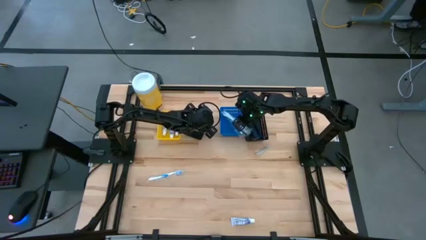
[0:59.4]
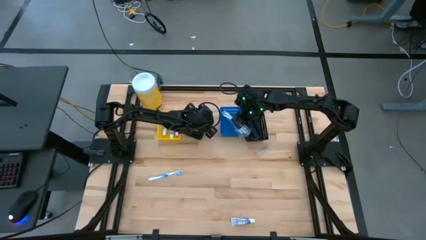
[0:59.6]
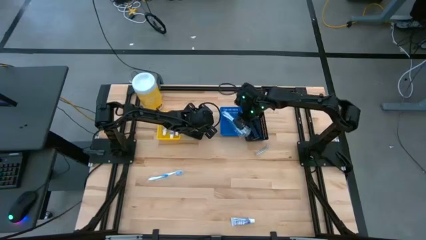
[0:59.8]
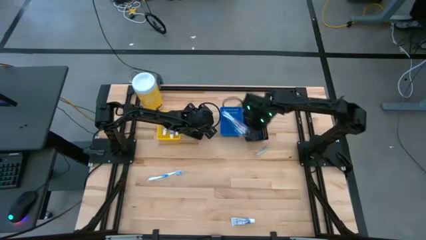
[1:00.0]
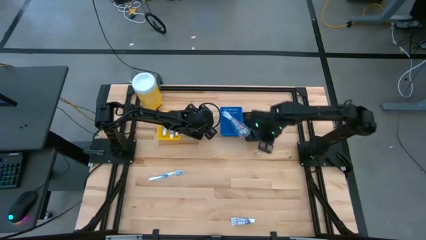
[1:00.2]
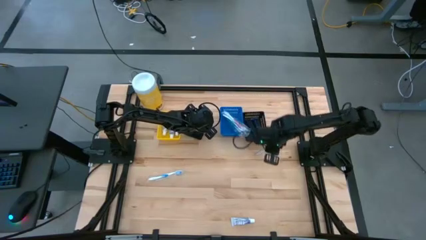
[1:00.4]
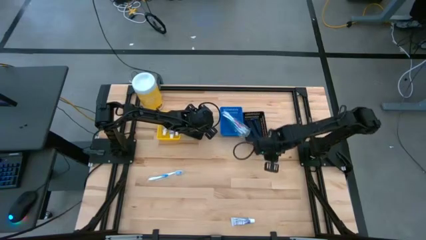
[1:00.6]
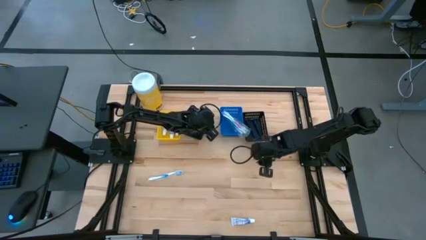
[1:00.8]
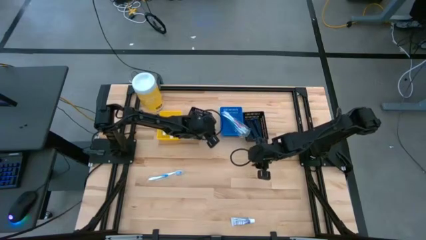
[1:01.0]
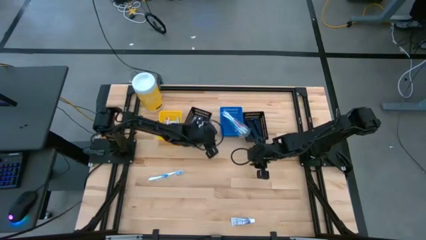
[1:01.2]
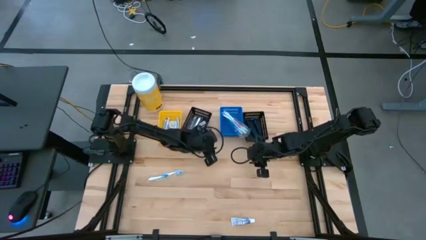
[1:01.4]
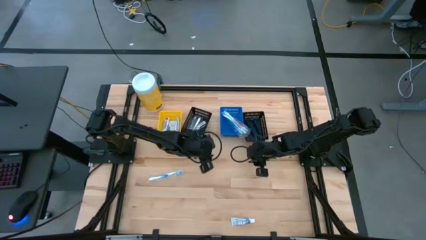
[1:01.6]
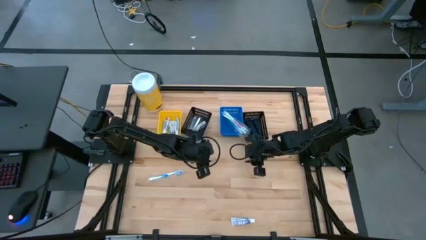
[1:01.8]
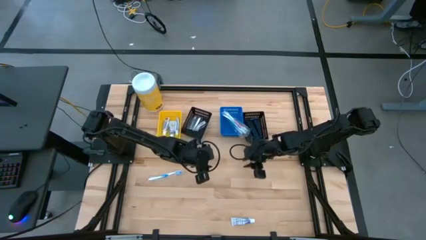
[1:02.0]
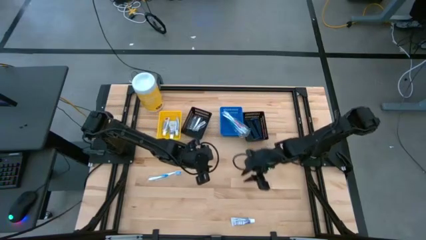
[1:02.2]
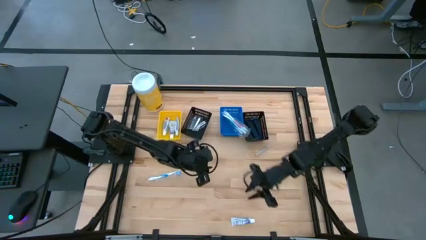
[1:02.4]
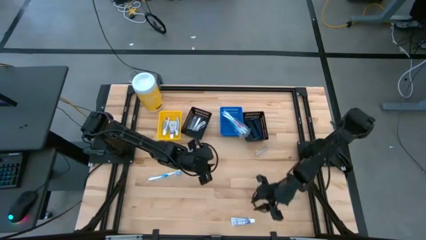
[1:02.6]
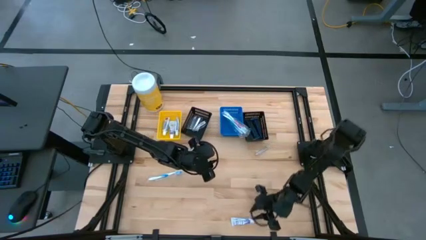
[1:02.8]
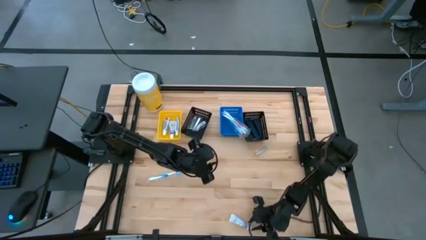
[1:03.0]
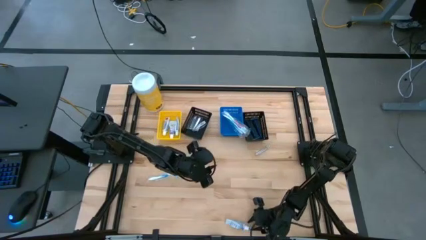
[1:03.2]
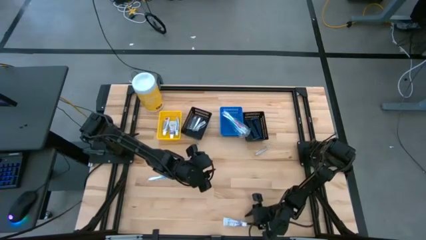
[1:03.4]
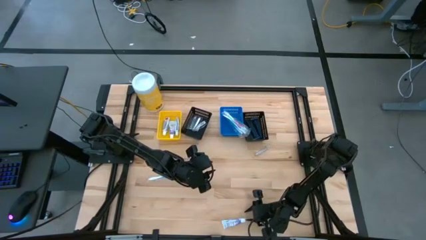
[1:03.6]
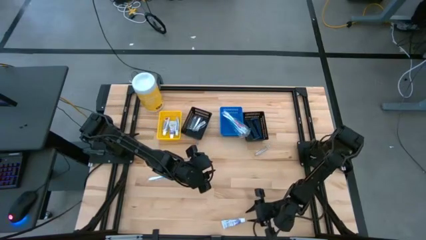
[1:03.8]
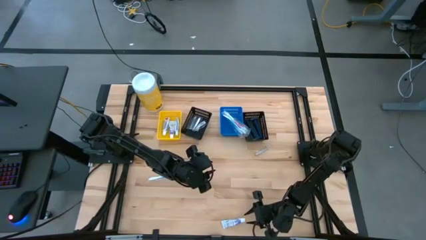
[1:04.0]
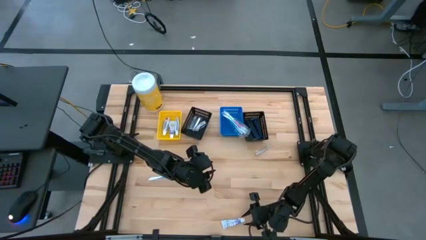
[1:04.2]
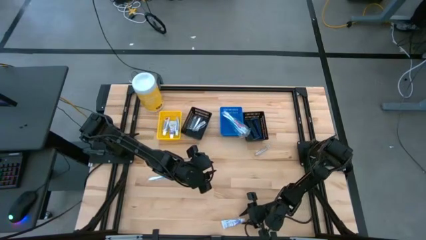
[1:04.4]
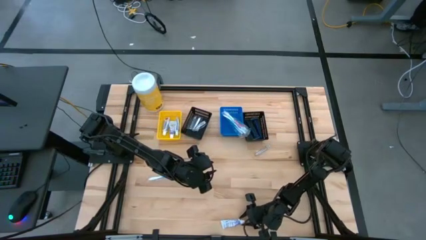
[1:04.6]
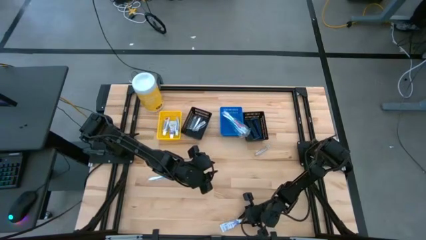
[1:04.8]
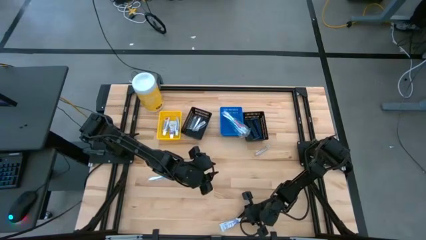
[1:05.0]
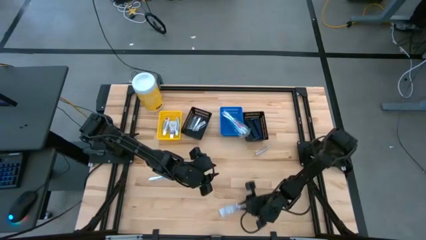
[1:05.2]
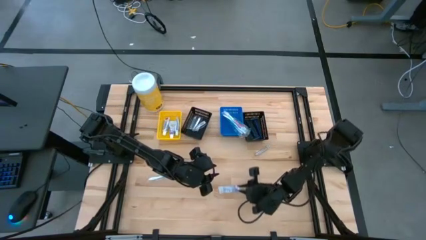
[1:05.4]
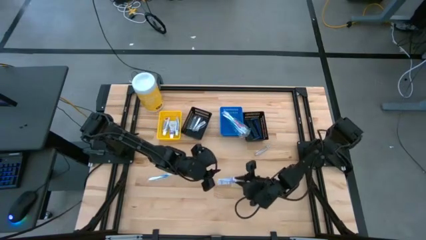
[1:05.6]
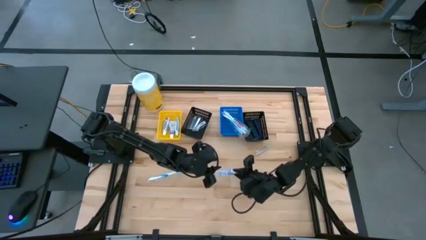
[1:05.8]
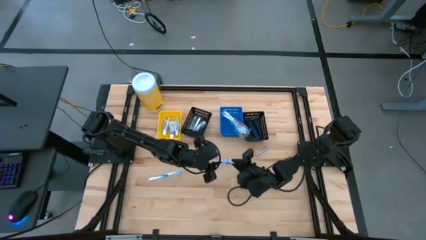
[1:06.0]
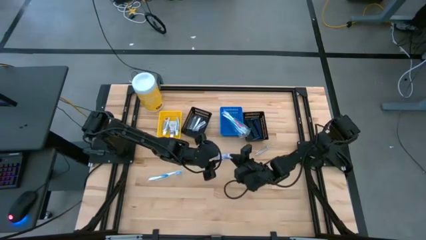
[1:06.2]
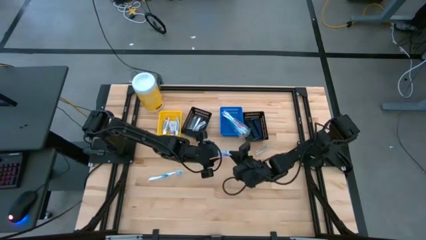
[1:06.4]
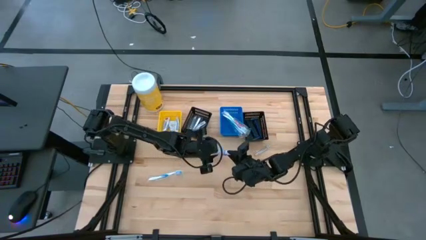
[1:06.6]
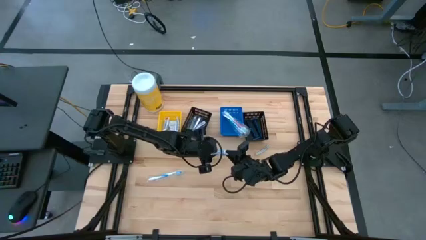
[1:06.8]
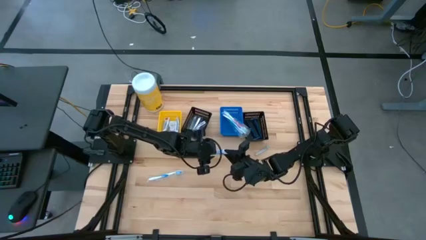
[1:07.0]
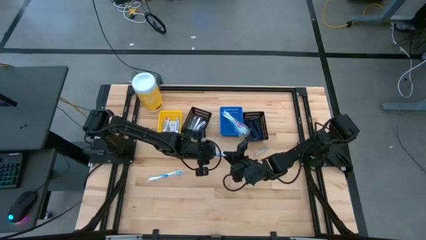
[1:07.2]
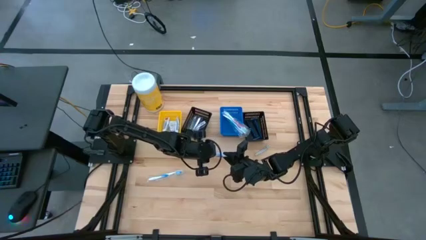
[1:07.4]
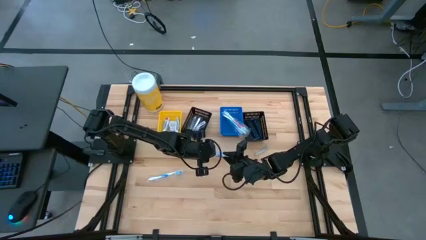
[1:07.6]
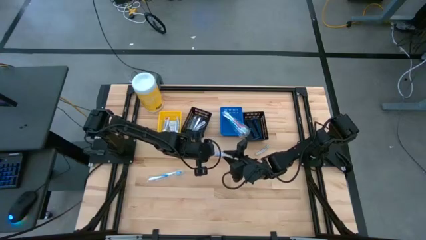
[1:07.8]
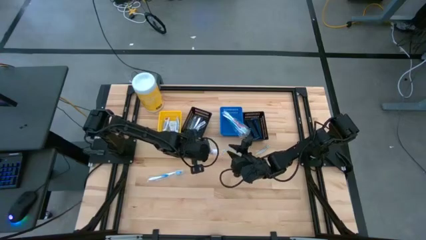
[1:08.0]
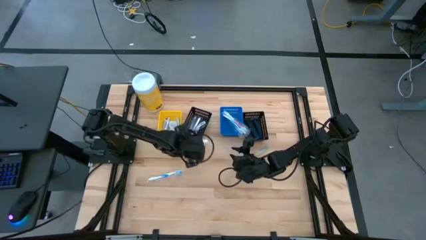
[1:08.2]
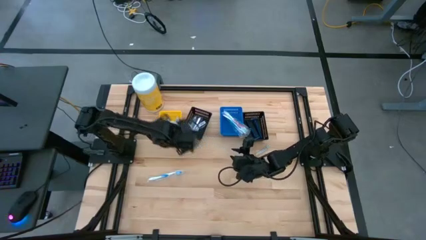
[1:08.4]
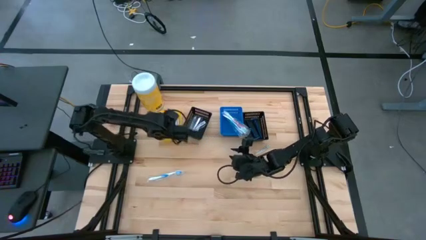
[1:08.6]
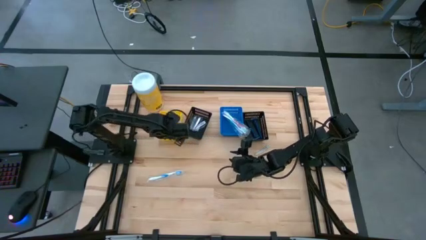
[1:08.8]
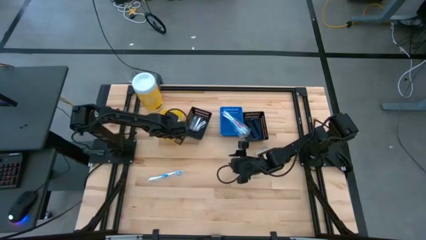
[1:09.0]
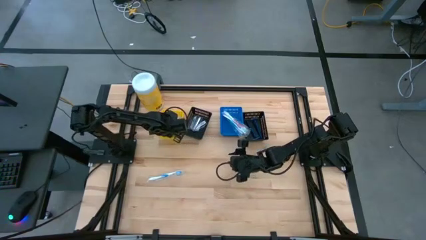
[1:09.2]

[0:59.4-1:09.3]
Task: Pick & Place Travel size toiletries
Put the white toothpaste into the yellow bin

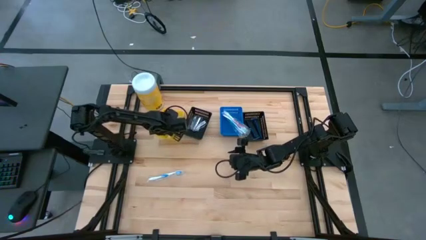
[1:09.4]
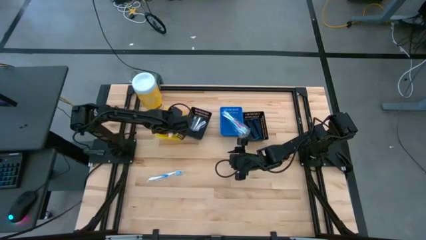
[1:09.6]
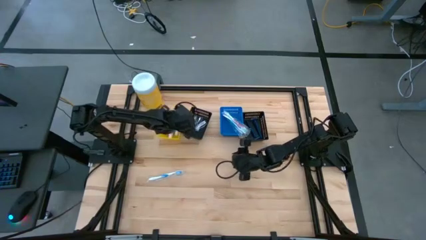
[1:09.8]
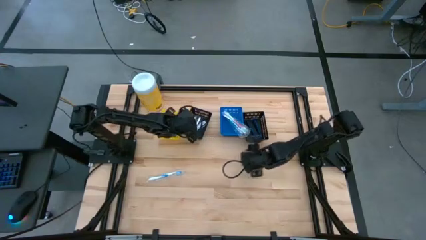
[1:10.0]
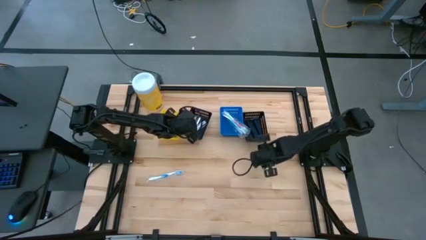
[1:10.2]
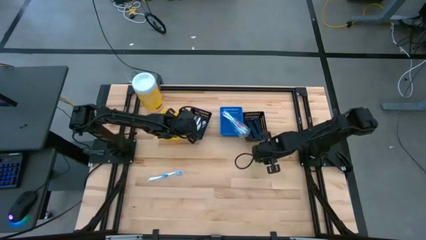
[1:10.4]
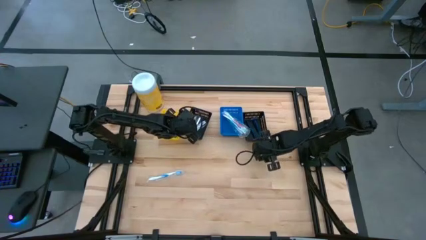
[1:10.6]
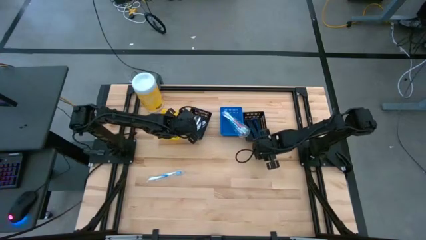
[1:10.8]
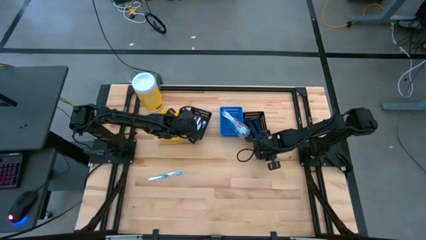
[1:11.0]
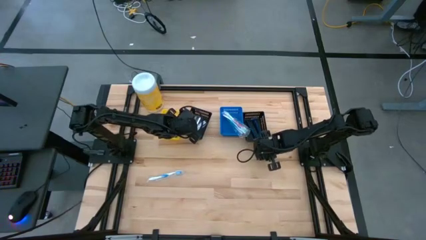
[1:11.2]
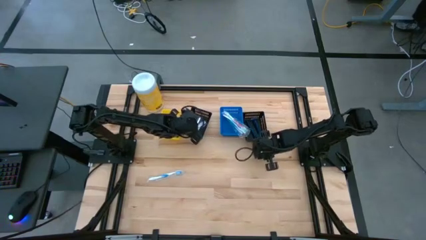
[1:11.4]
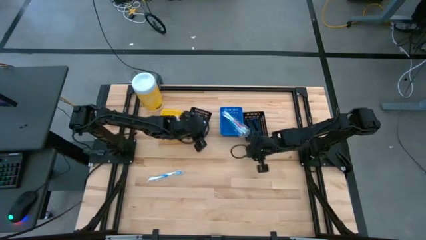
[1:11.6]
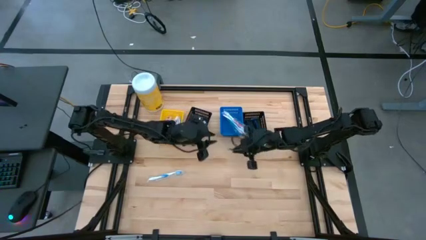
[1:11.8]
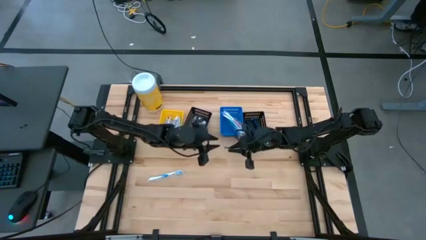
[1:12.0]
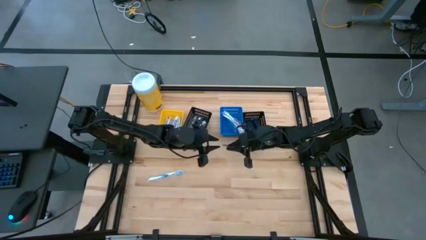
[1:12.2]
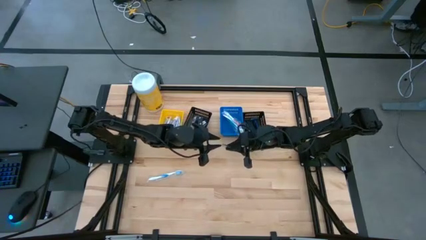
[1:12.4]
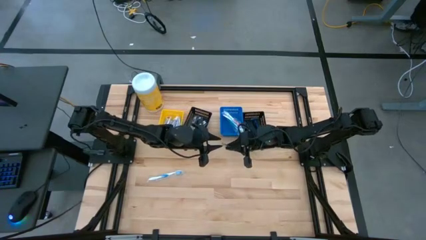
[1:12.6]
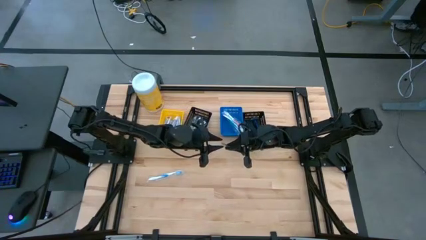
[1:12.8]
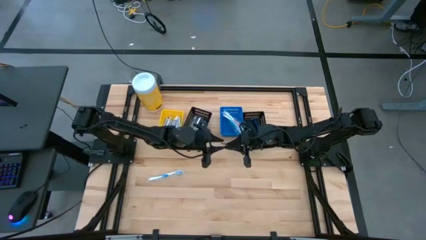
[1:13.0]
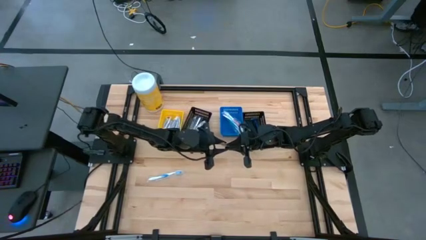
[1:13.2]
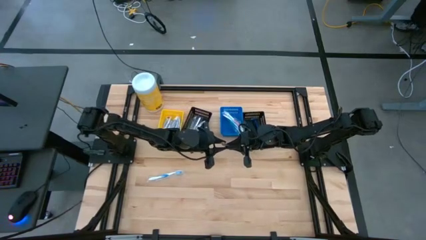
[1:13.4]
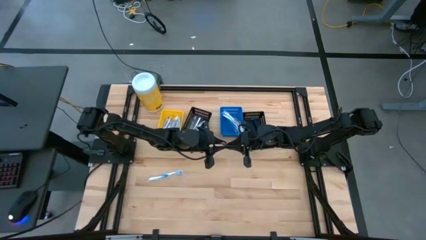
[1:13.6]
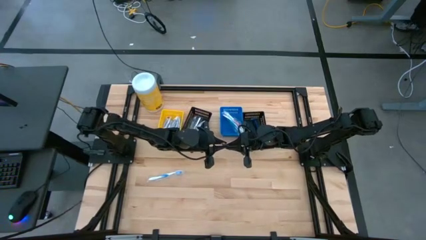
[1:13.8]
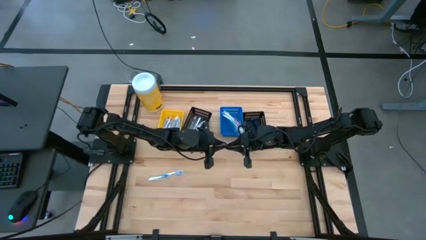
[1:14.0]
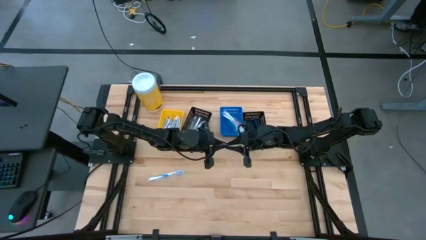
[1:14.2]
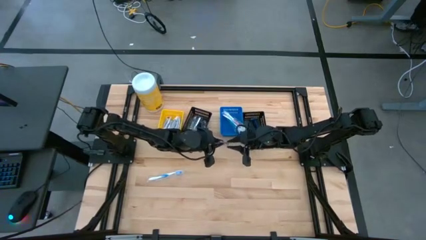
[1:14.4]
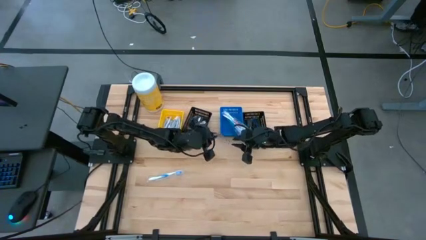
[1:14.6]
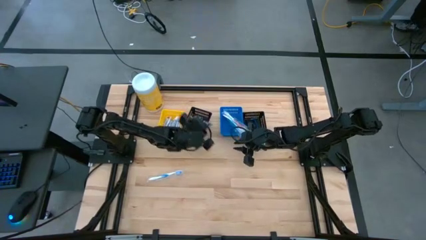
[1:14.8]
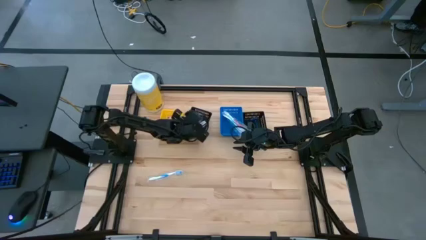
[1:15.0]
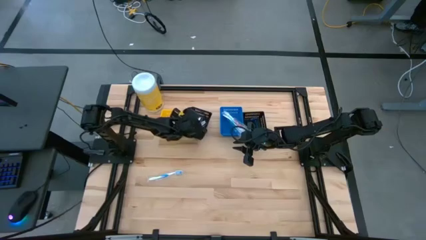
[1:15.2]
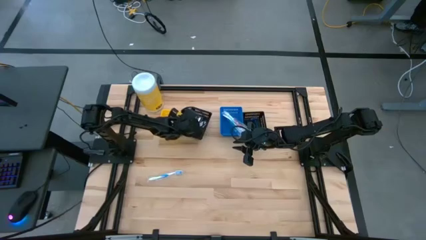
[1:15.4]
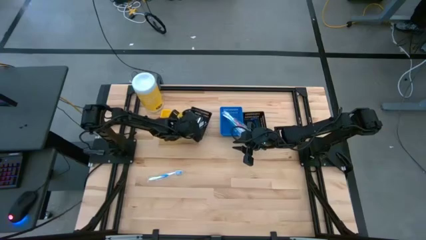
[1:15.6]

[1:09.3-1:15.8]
Put the silver nail cutter into the right black bin

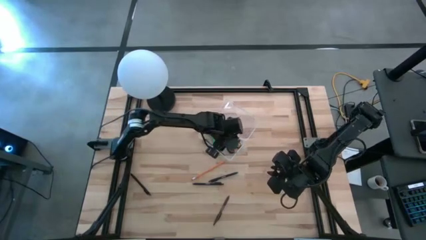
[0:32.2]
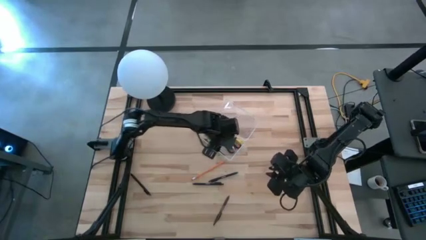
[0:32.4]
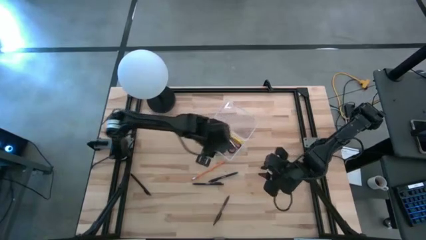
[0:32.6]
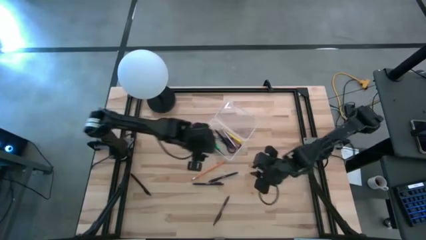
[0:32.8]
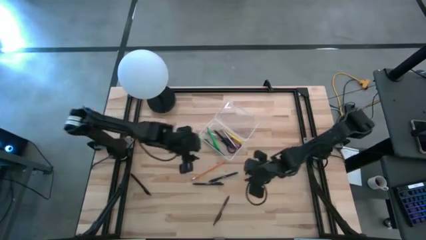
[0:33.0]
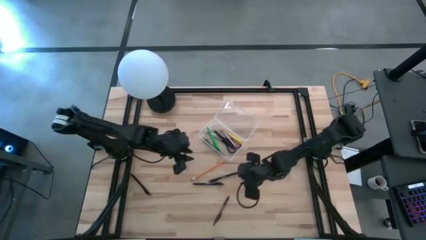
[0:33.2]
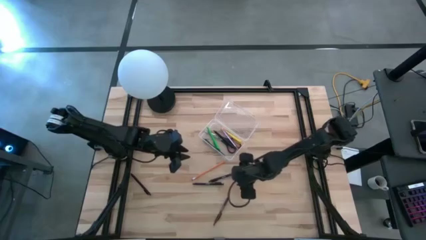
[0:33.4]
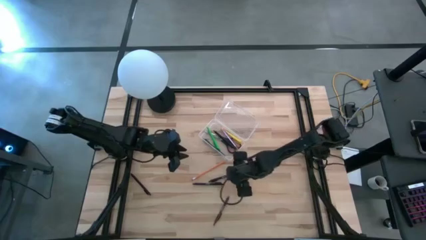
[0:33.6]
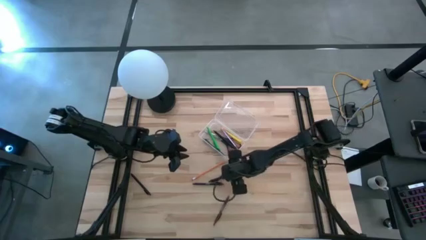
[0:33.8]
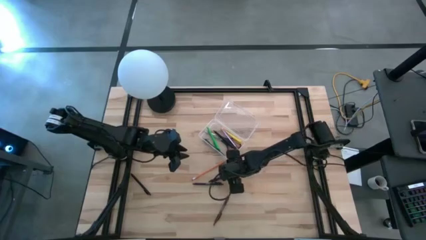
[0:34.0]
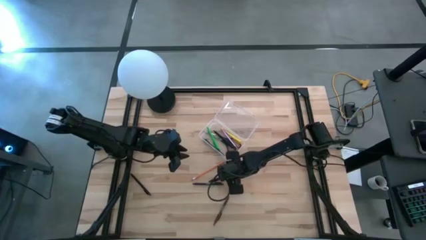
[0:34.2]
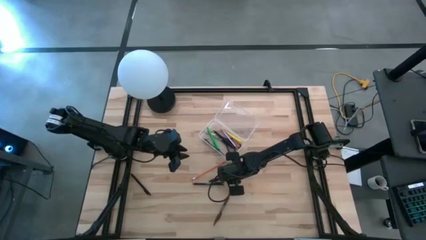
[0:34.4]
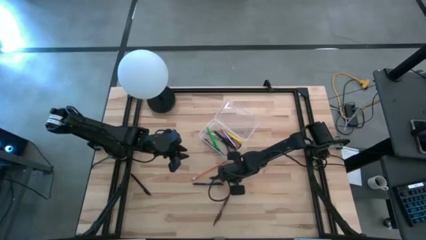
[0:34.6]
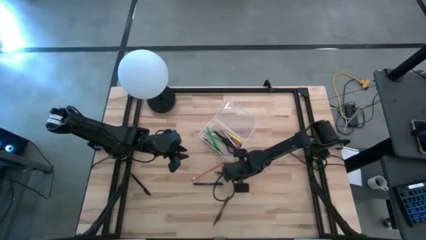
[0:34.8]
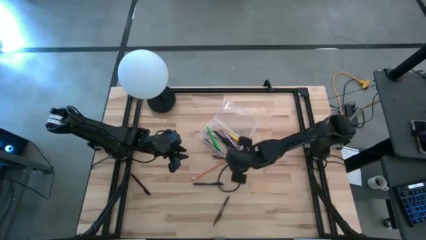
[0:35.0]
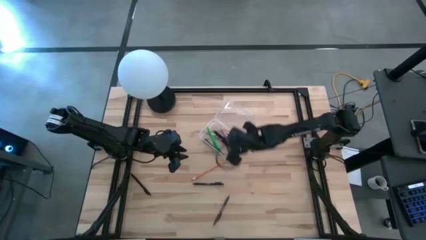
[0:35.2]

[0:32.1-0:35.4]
Task: Pick & place school supplies into a supply box
Put the black pen into the transparent supply box
